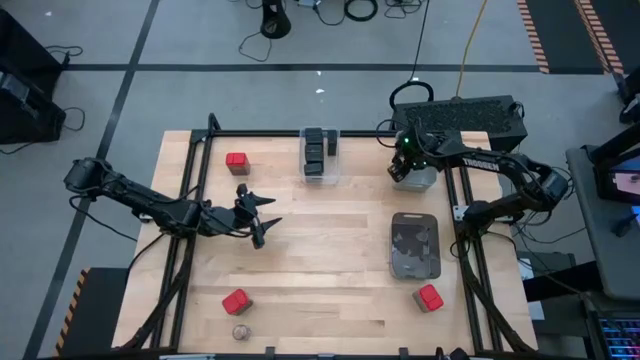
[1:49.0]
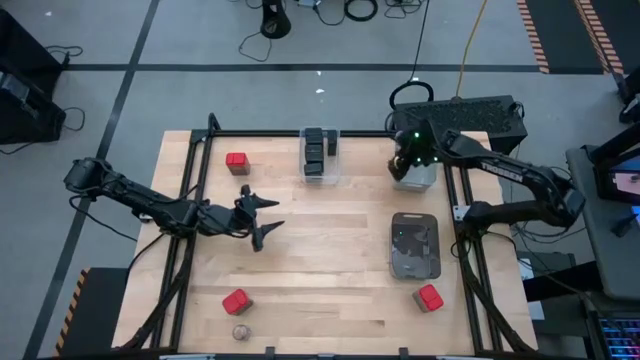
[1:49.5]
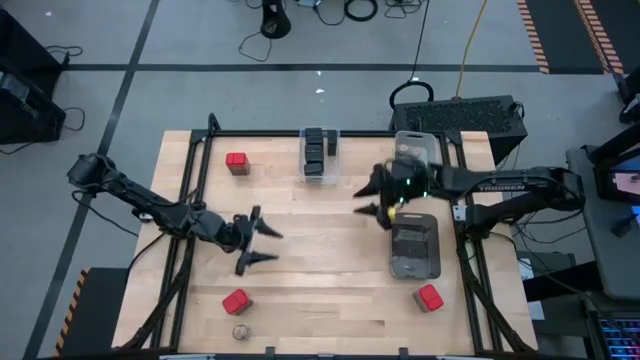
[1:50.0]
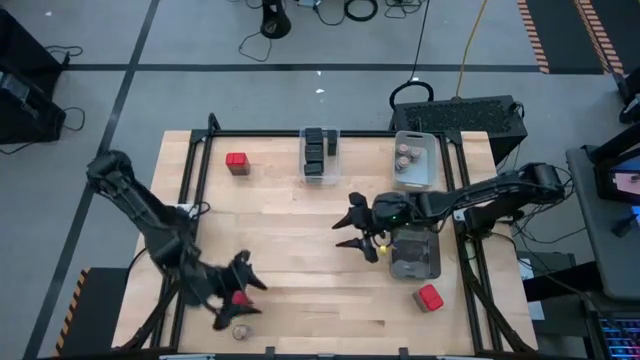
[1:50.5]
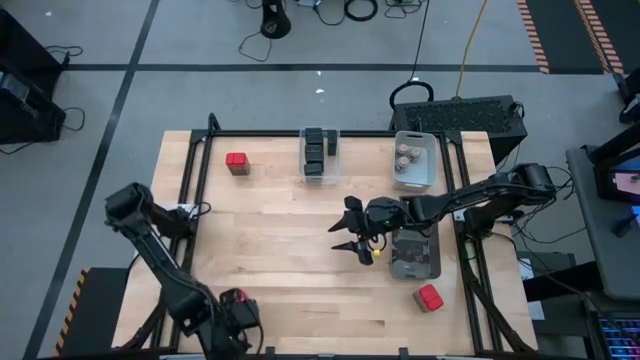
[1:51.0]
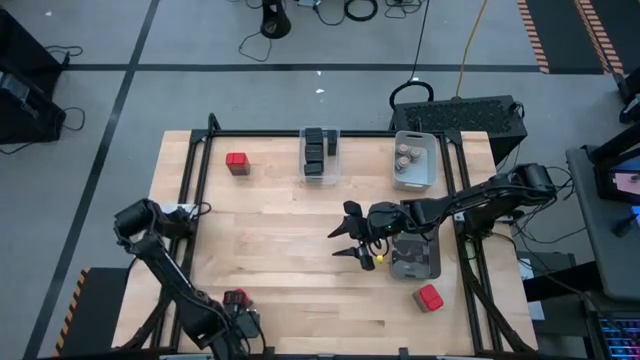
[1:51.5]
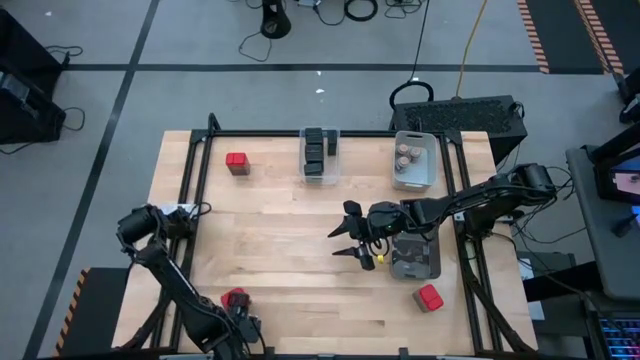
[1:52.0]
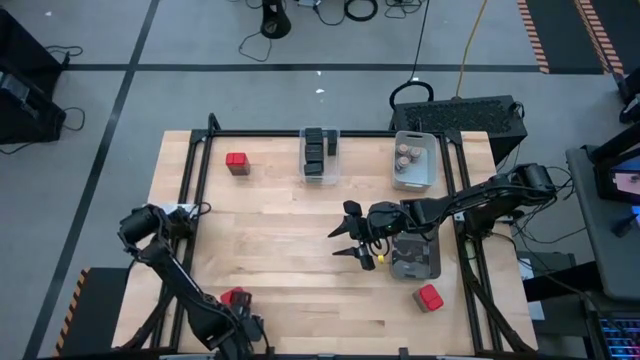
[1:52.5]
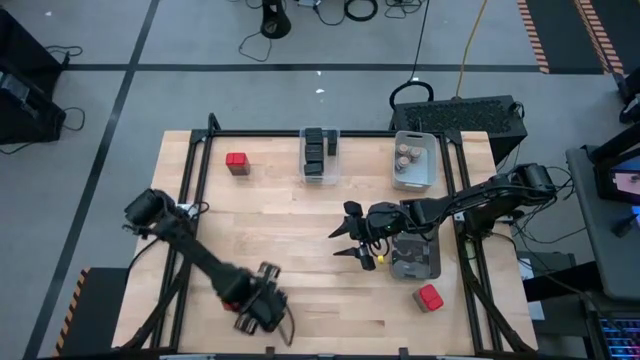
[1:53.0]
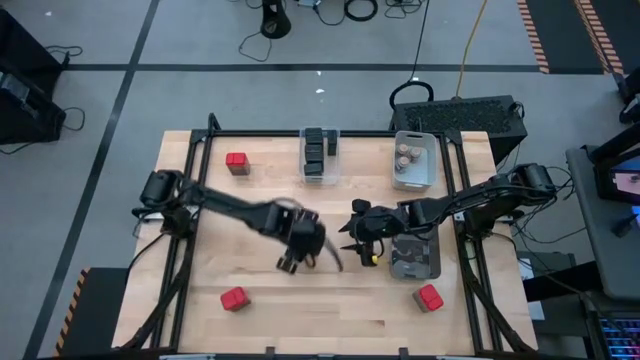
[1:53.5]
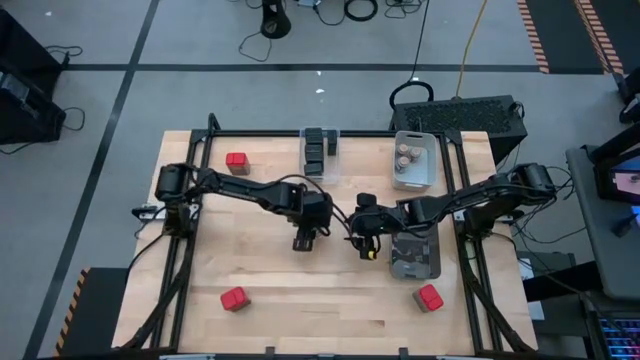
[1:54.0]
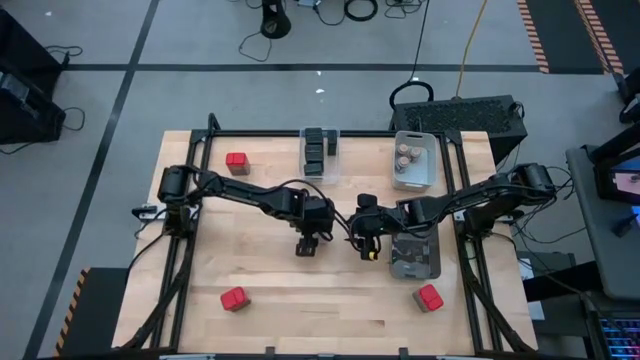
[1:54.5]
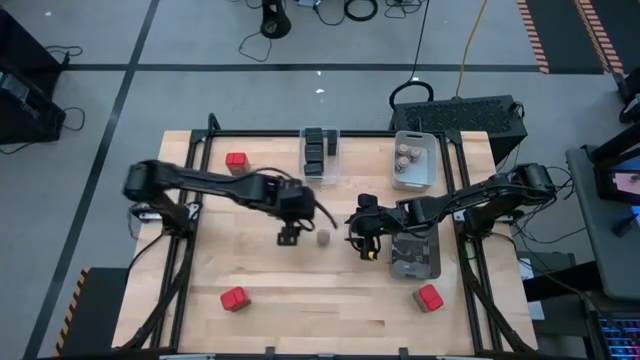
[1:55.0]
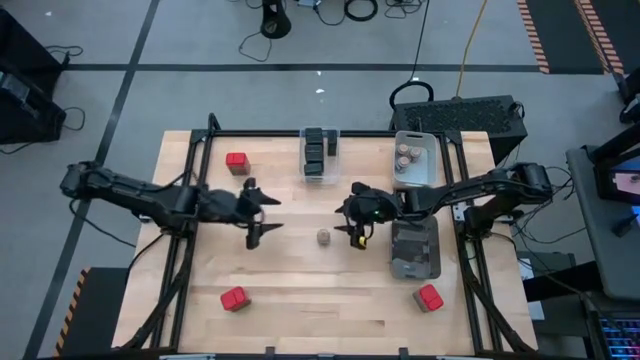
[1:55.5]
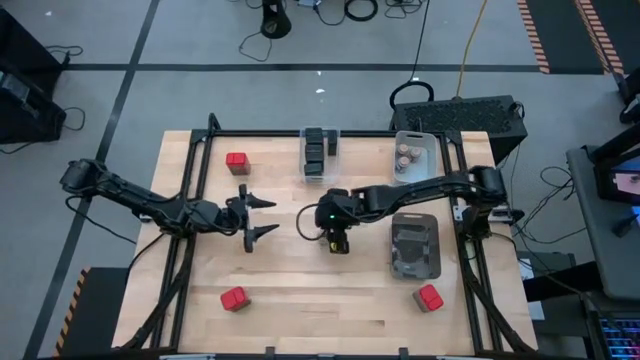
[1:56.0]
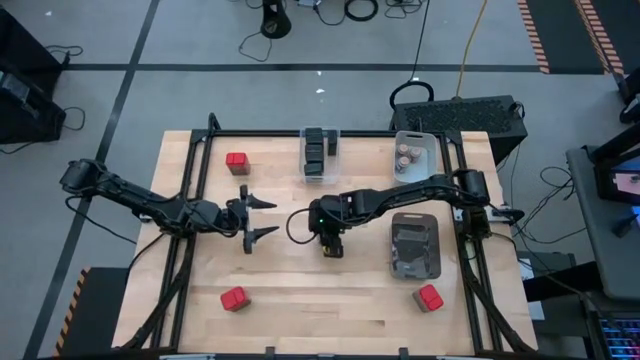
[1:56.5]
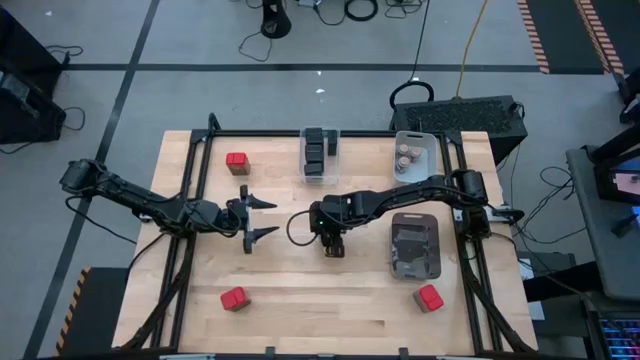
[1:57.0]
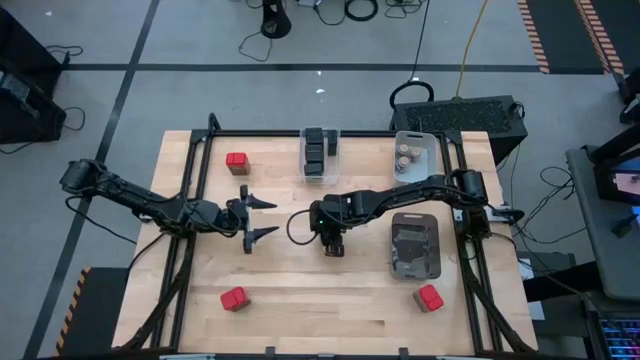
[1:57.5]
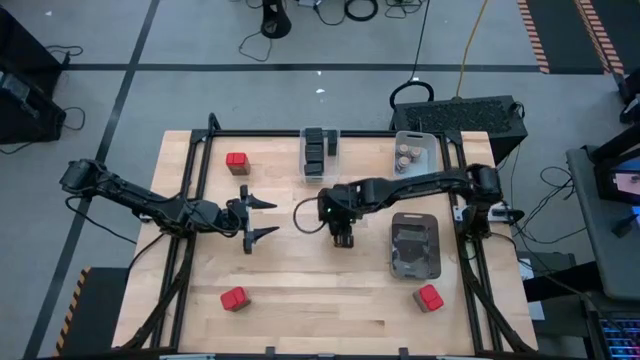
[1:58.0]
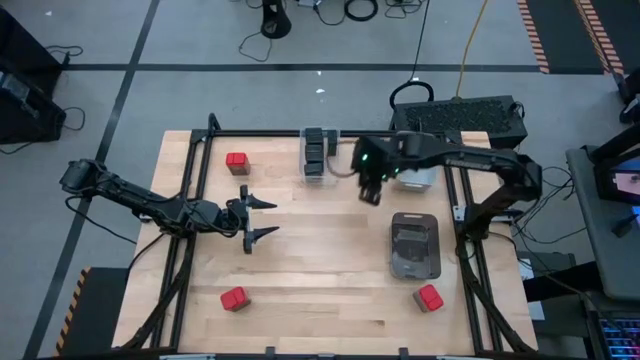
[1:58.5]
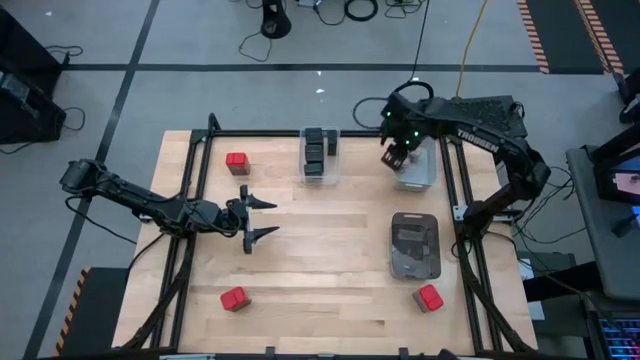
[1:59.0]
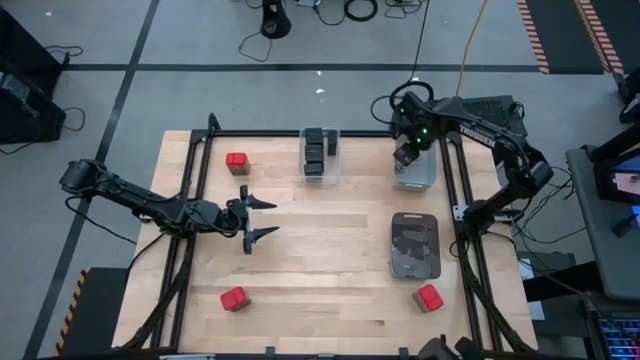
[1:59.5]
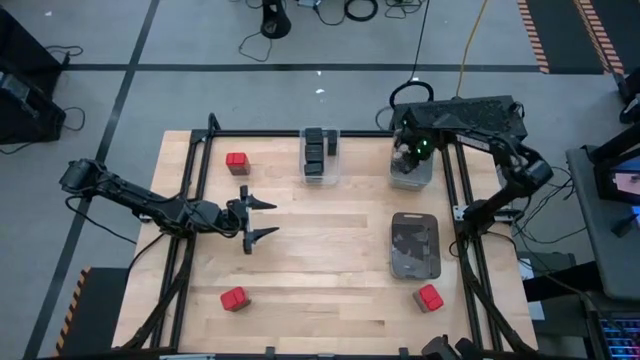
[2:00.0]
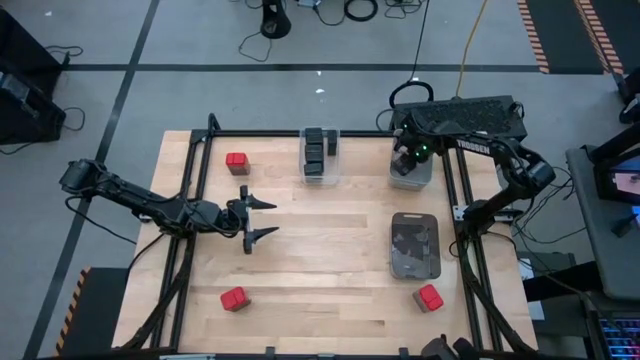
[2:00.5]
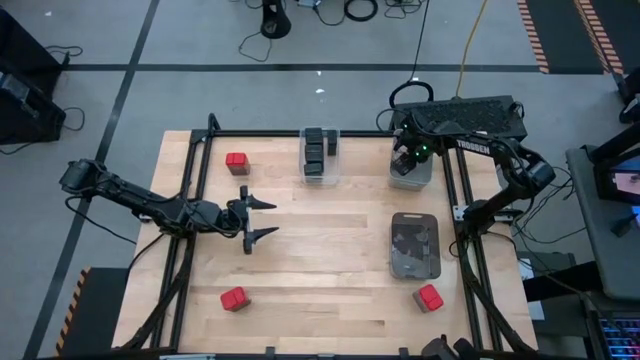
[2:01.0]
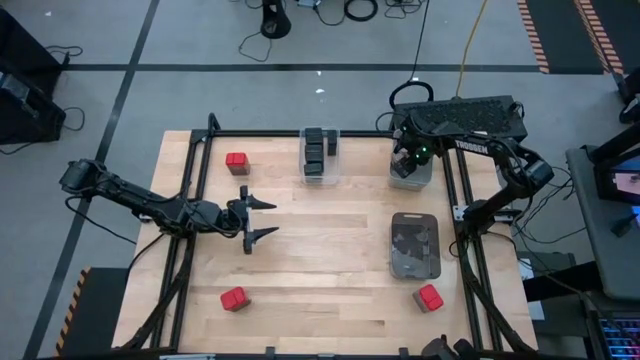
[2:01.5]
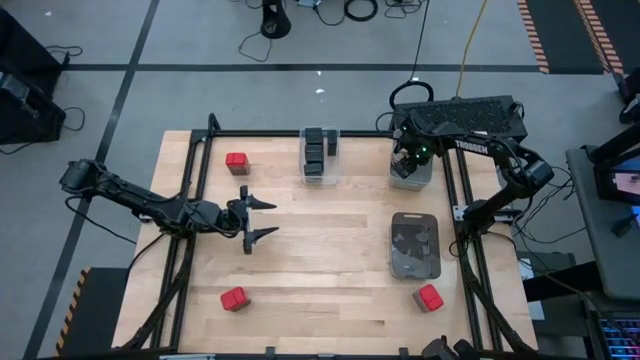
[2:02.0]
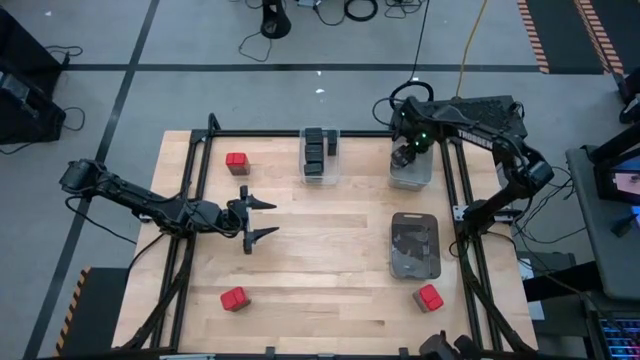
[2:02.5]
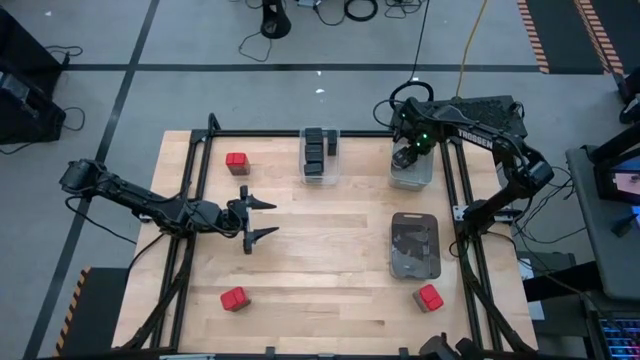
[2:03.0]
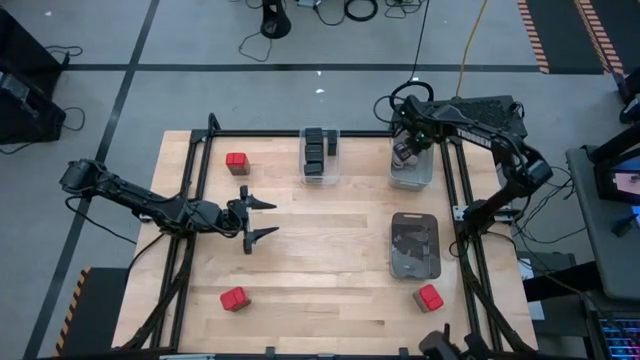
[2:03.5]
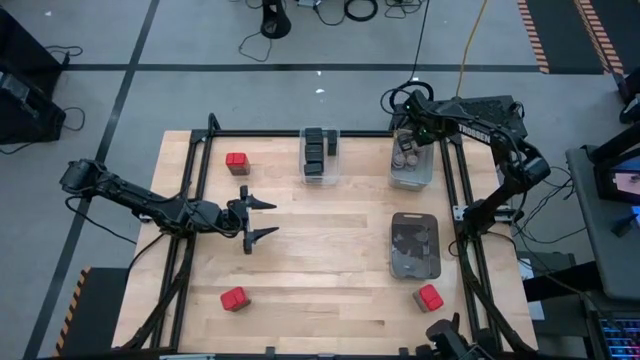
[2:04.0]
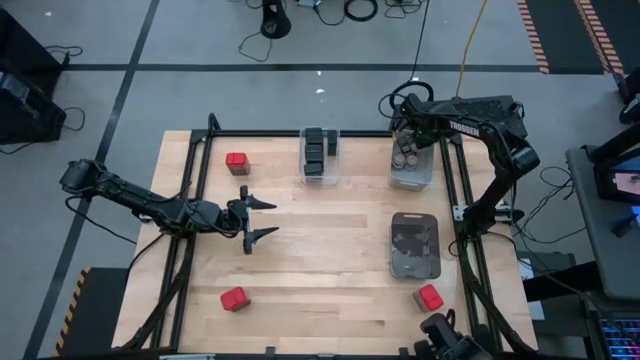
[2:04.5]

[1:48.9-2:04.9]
Task: Sort spices by type
Put the transparent seasoning bottle into the gray bin
